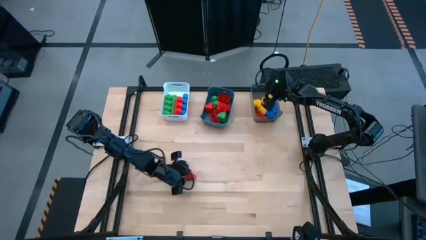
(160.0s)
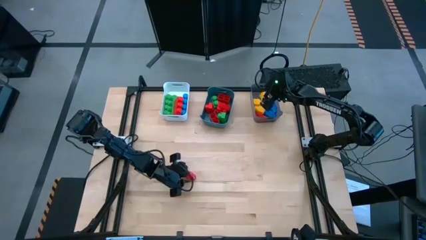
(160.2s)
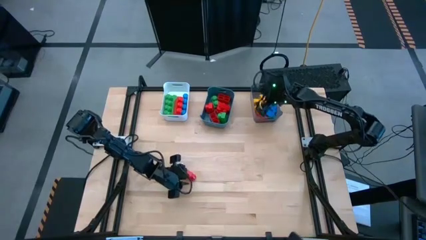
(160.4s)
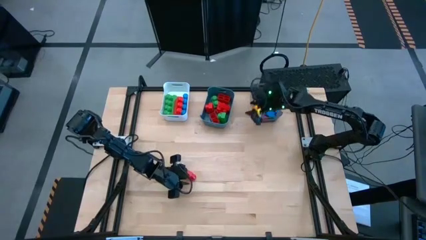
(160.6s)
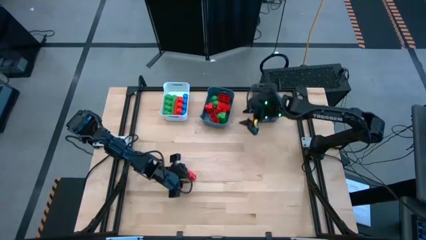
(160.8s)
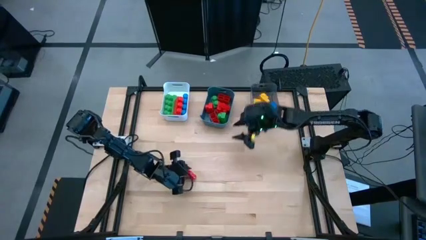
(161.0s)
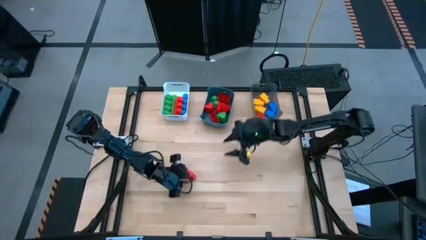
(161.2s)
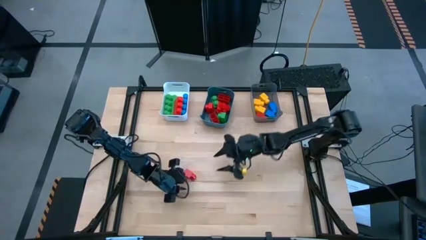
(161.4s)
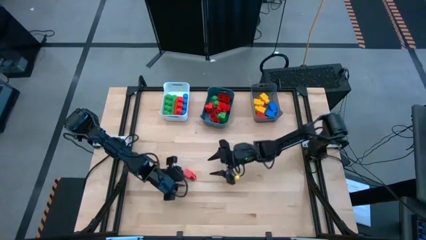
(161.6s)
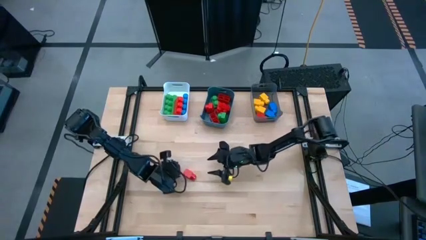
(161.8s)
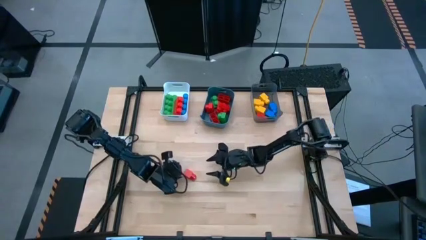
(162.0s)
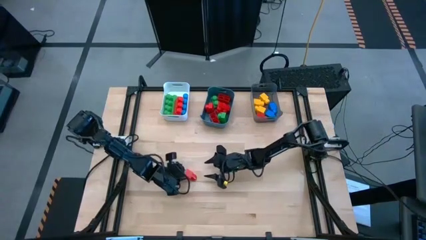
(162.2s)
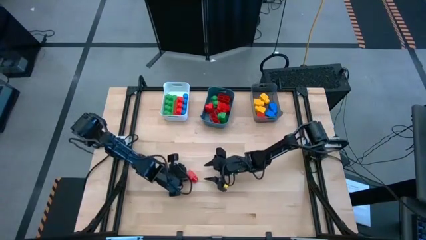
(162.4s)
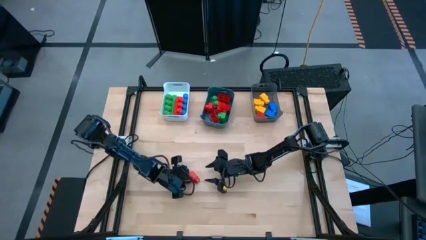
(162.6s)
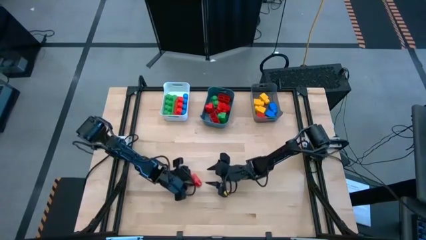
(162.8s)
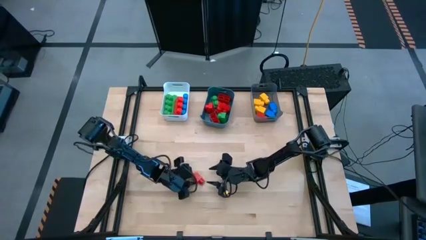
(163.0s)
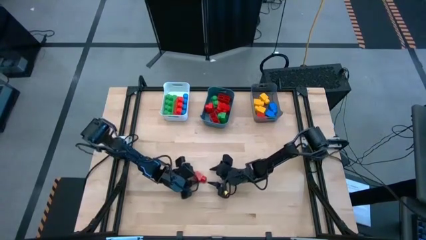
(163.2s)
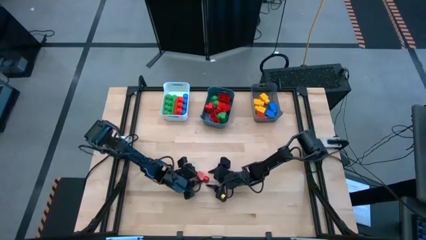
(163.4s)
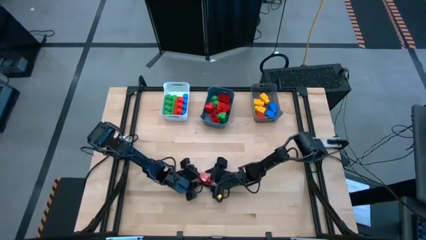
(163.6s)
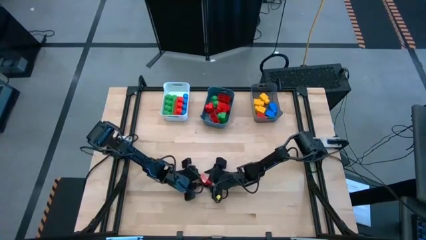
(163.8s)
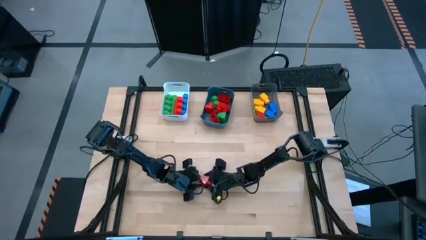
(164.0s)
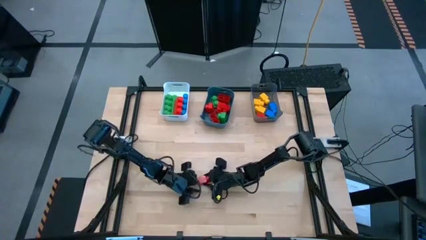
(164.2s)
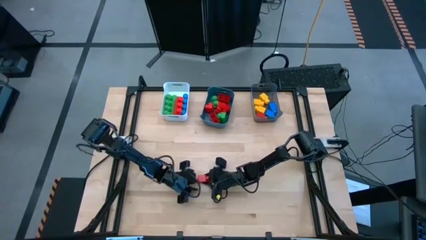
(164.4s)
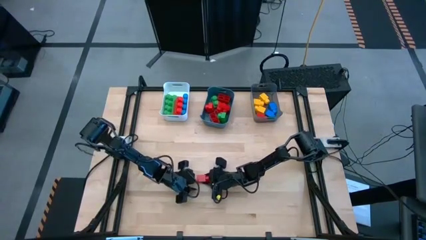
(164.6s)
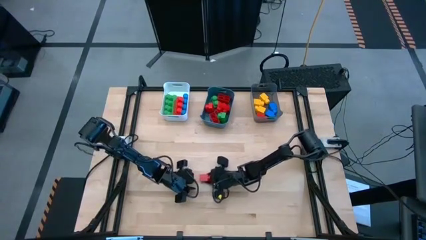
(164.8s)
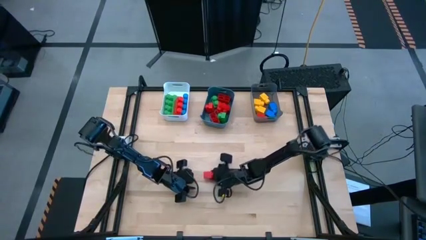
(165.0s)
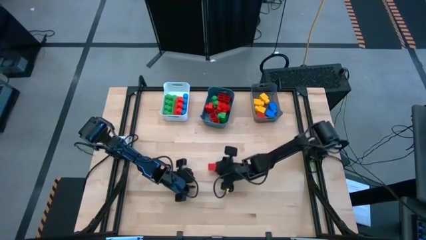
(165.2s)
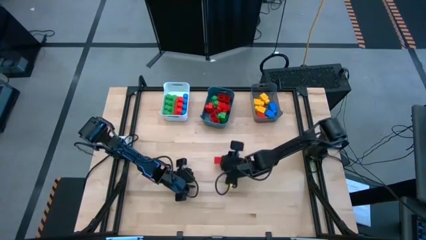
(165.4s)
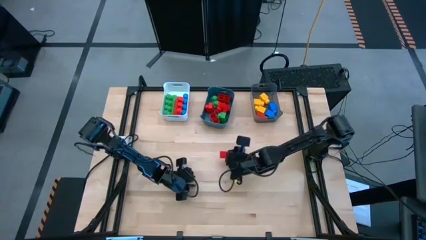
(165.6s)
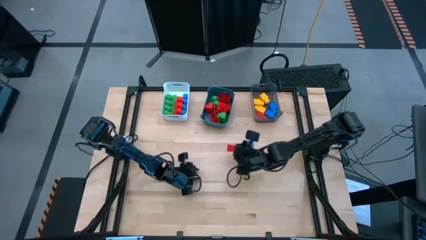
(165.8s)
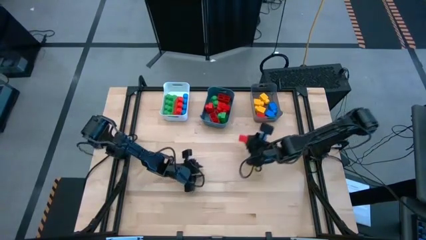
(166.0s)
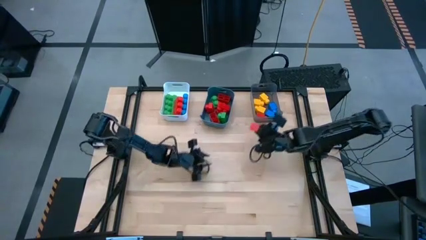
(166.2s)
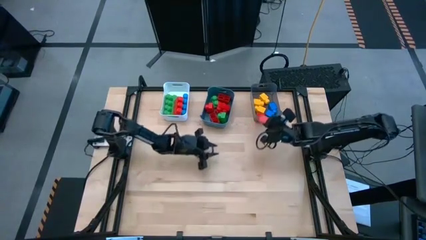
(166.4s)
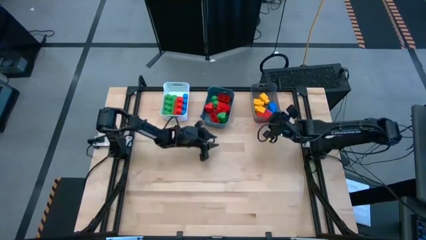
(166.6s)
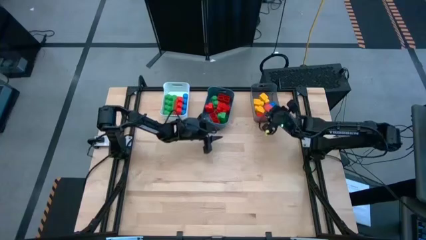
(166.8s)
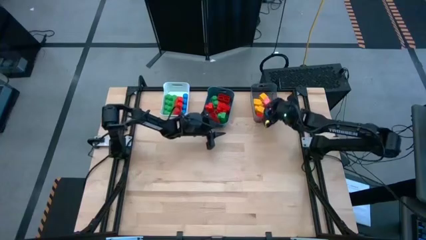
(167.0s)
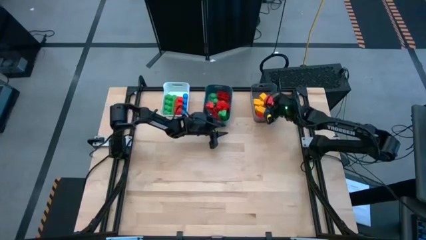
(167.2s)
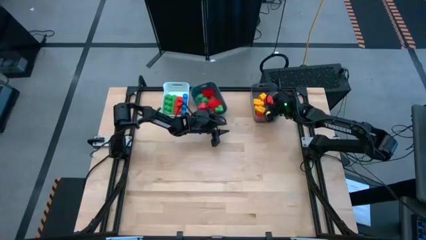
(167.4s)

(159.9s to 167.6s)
Task: Sort blocks by size
Put the 1 stud red game piece into the black bin

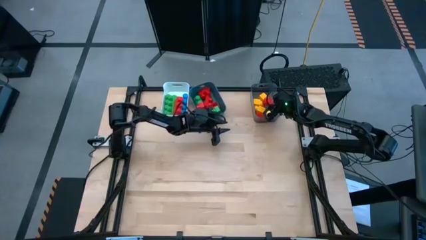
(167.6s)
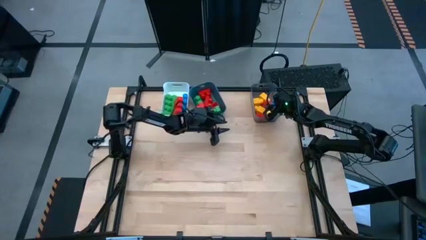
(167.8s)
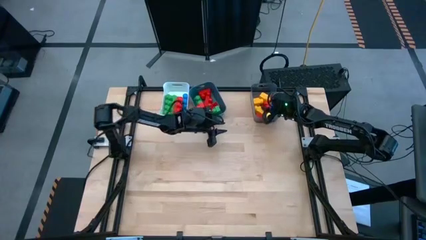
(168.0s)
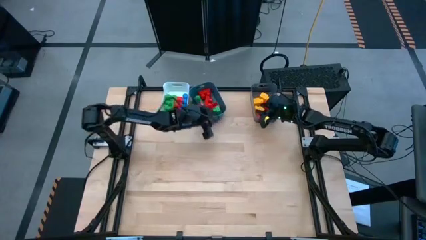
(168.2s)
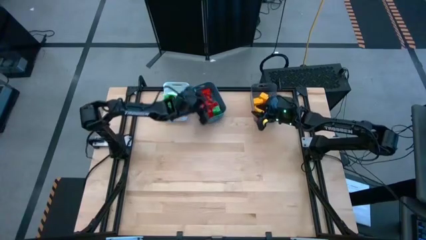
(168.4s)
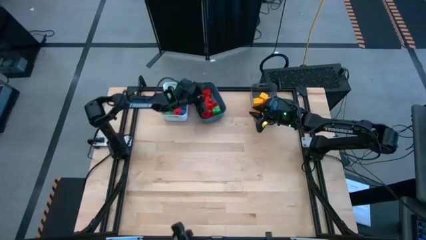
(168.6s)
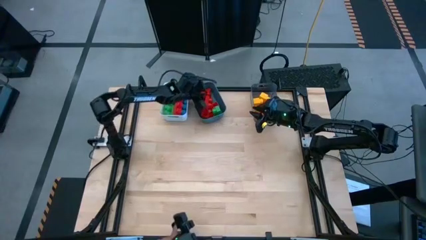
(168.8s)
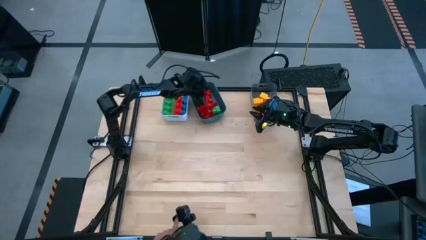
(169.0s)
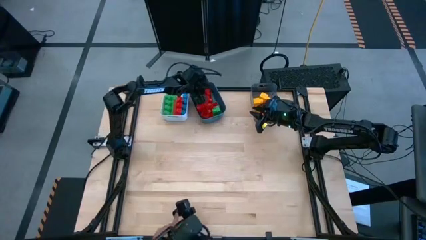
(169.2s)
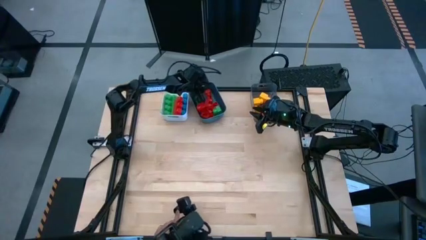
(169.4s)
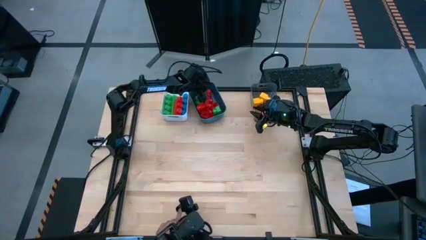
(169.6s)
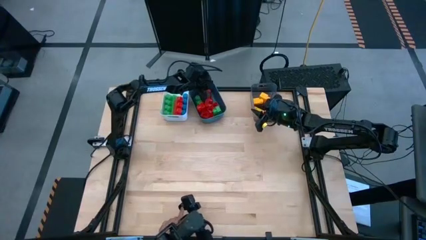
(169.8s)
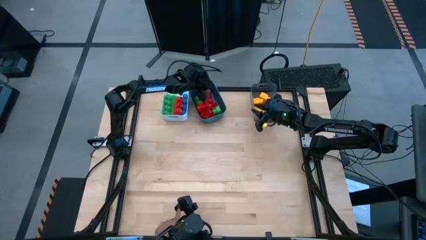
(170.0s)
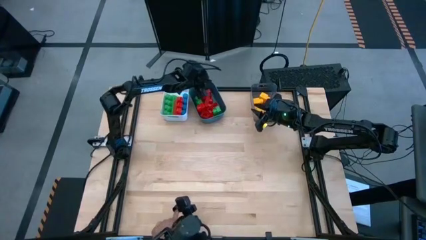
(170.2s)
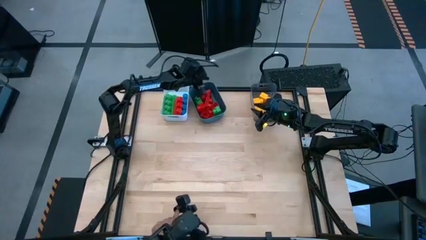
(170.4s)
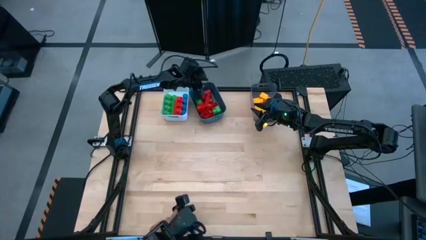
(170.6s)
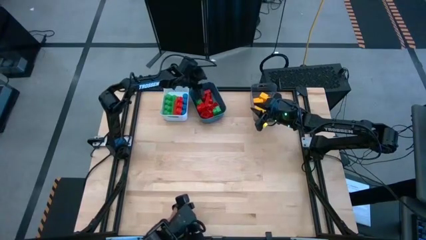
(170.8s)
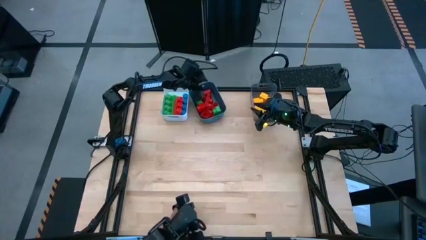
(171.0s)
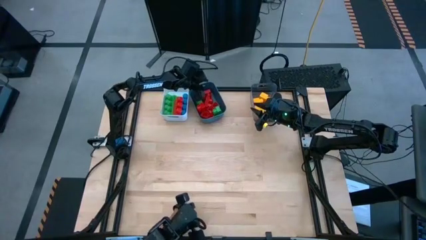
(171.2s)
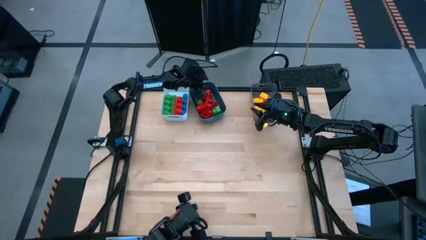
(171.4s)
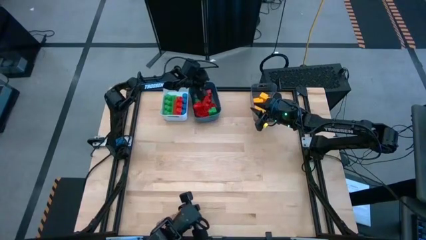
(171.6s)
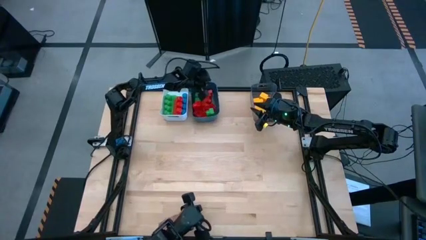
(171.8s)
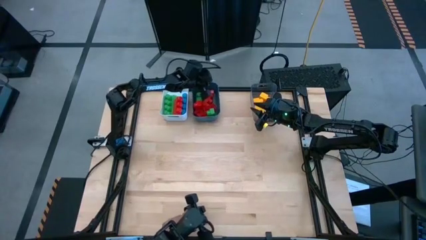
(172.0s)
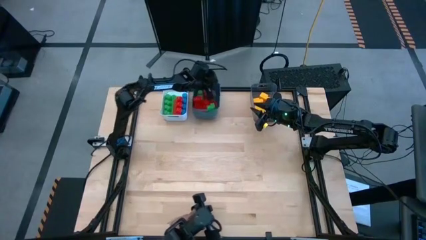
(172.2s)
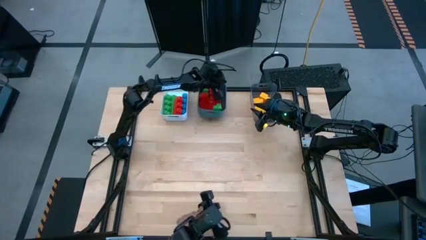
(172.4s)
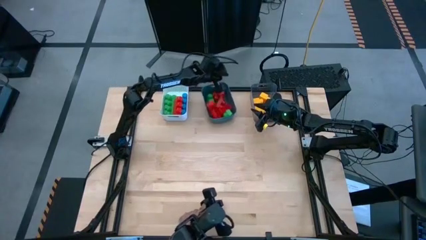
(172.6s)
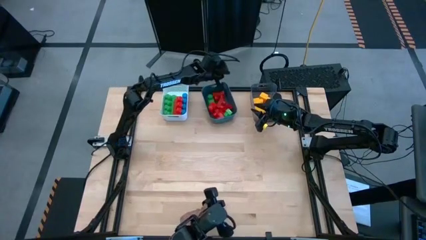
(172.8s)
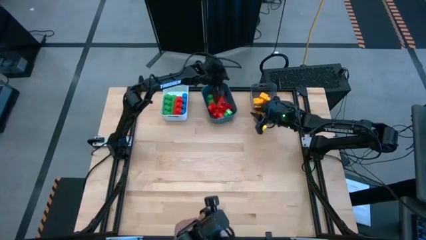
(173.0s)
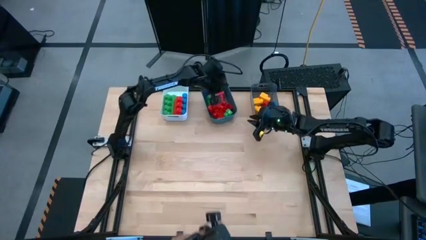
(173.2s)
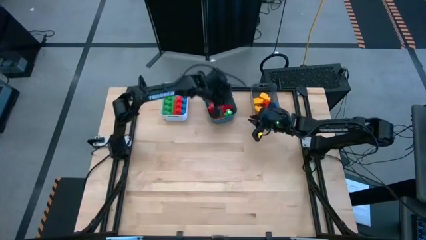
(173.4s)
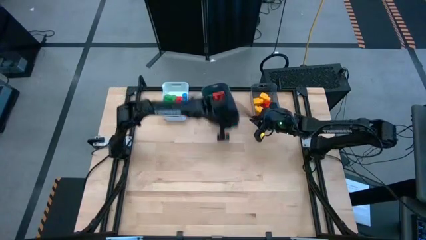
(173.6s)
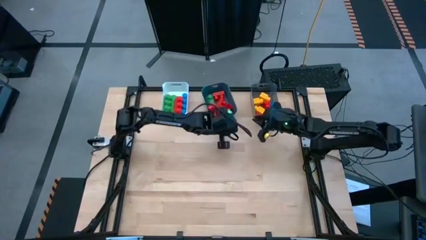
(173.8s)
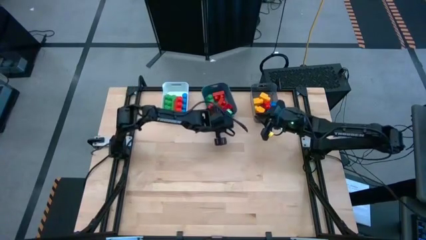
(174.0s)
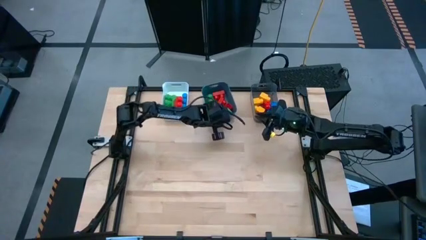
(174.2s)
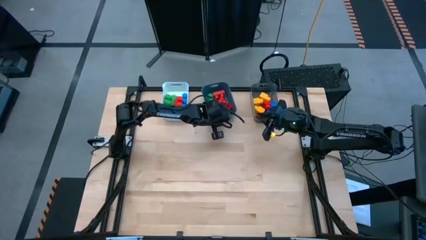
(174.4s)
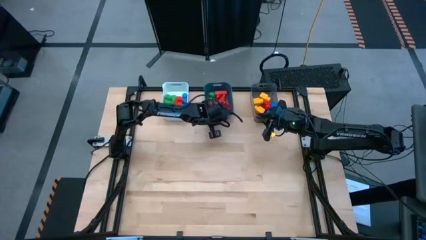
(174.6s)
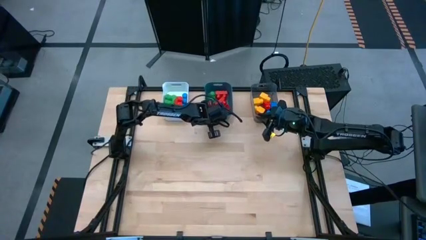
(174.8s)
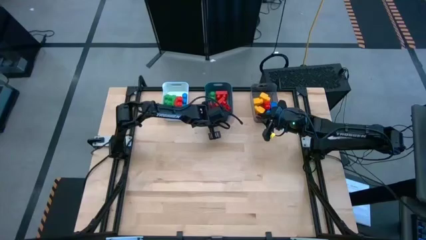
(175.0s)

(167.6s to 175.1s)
Adjust the blue bin
